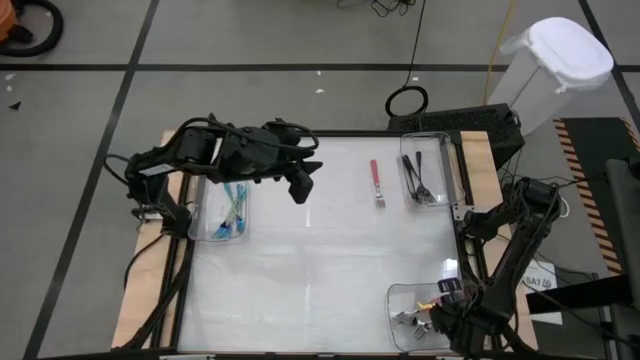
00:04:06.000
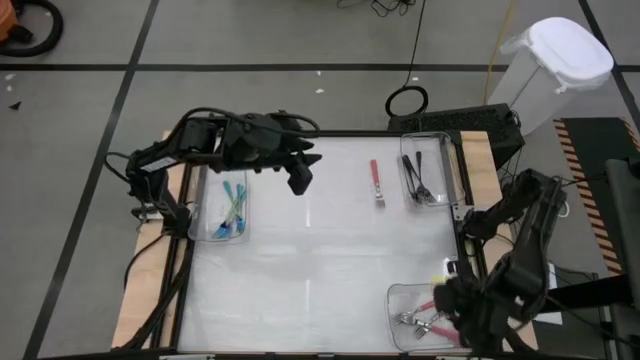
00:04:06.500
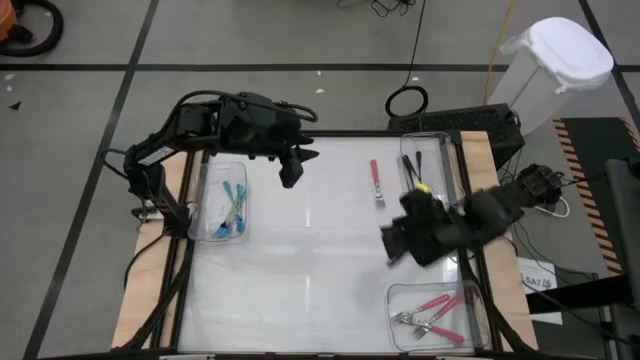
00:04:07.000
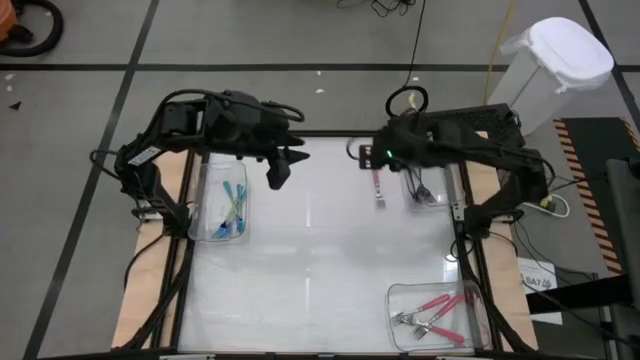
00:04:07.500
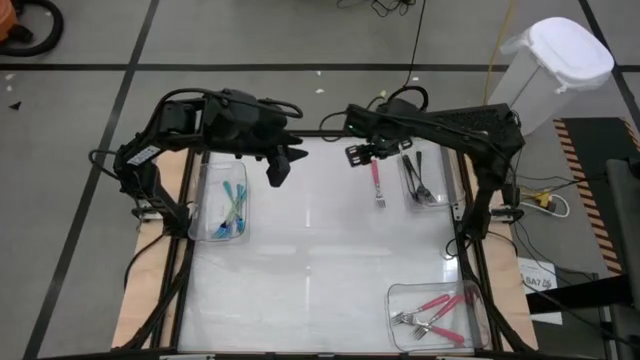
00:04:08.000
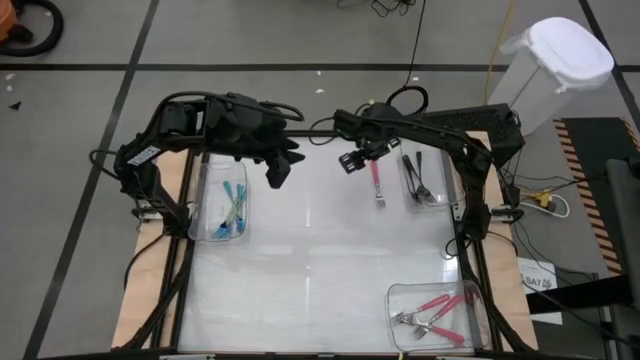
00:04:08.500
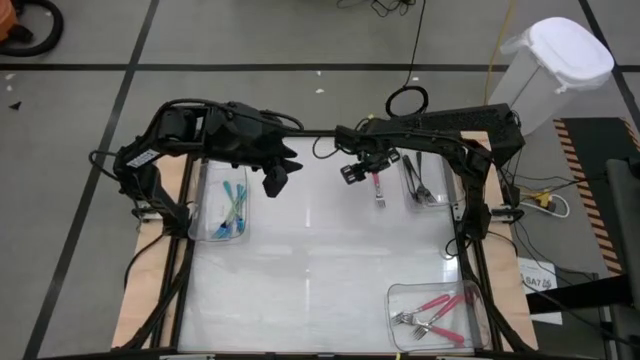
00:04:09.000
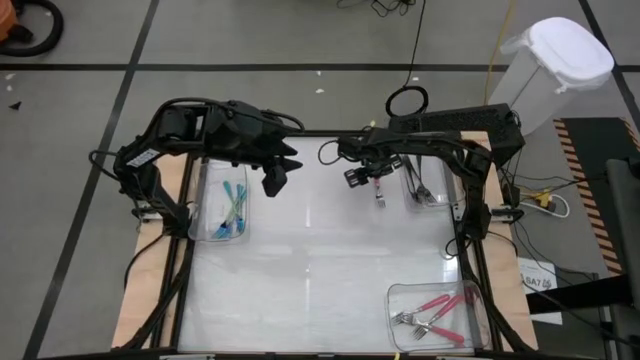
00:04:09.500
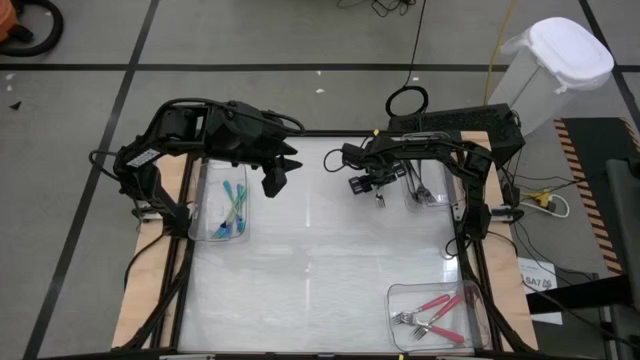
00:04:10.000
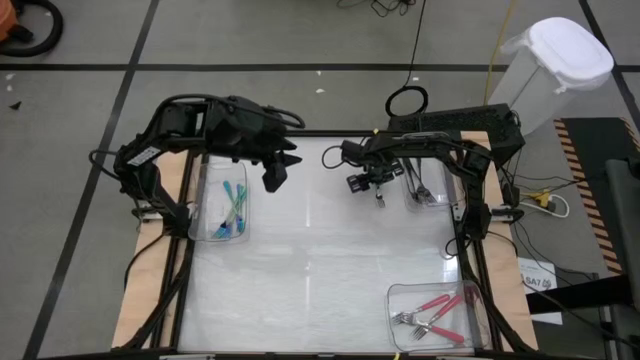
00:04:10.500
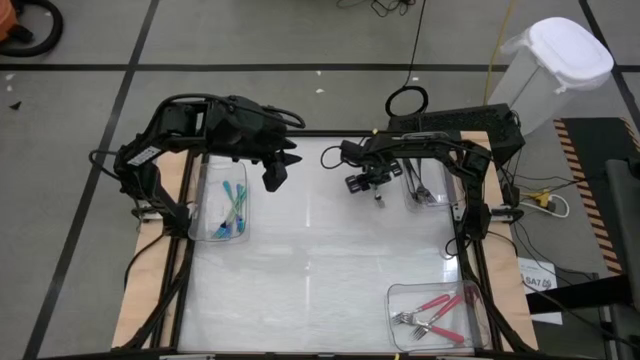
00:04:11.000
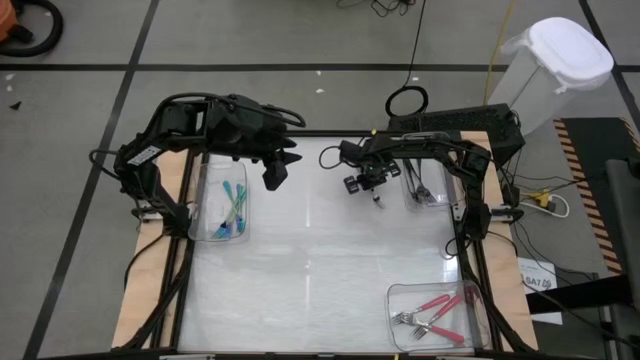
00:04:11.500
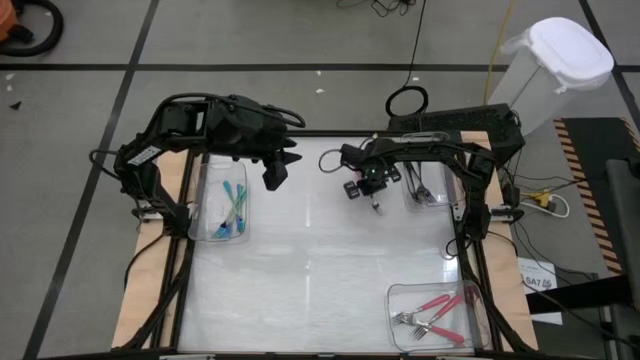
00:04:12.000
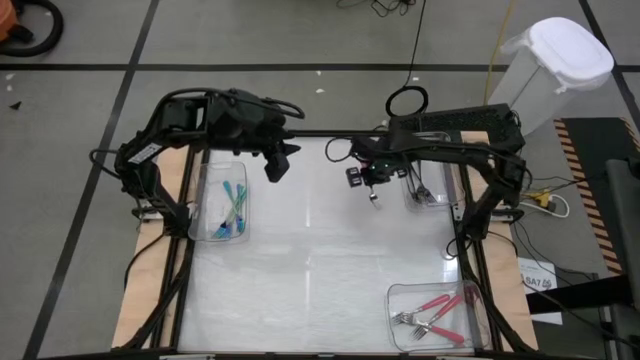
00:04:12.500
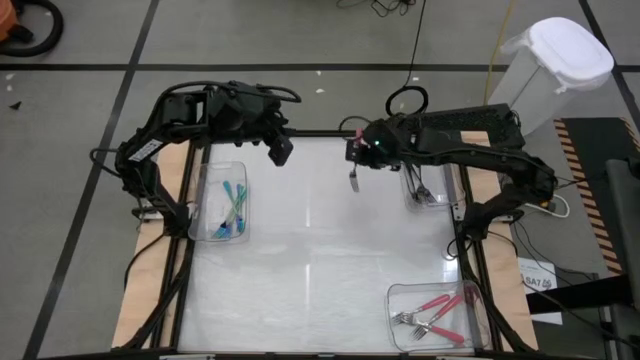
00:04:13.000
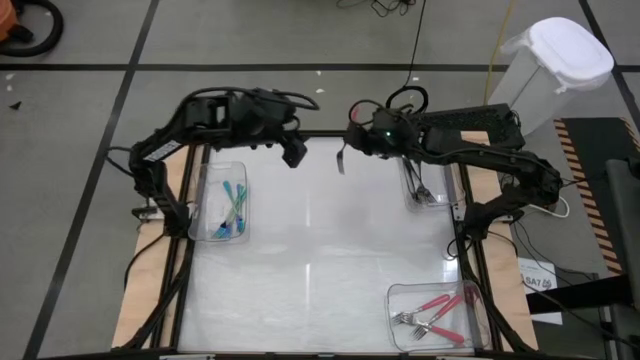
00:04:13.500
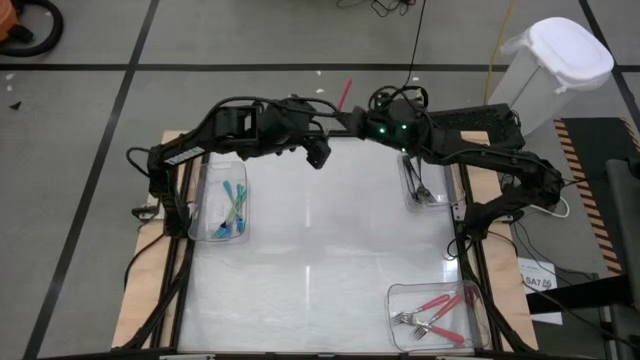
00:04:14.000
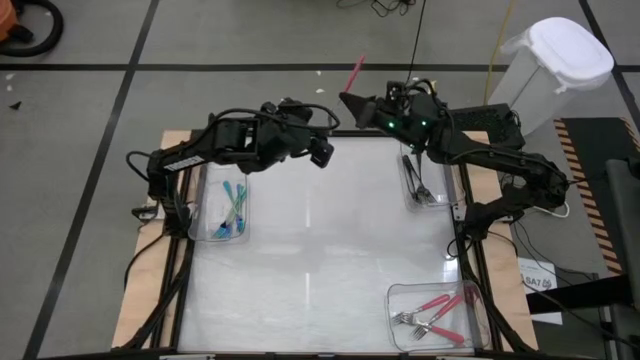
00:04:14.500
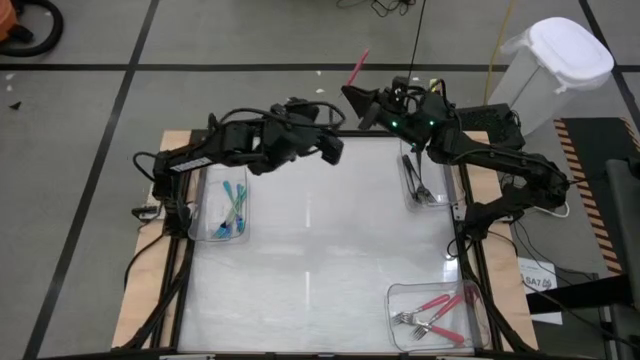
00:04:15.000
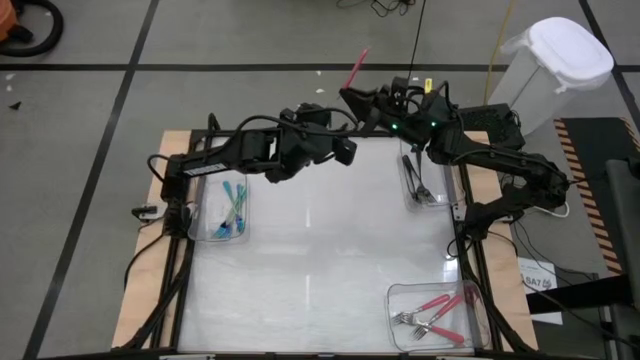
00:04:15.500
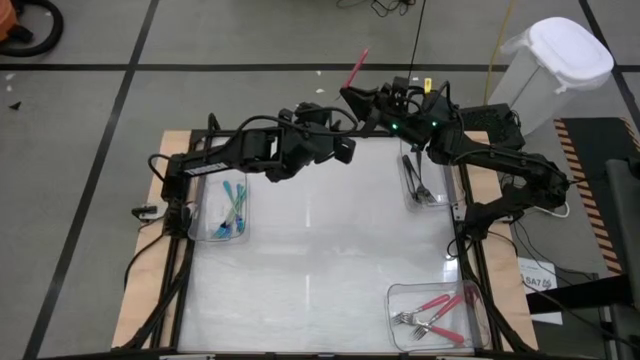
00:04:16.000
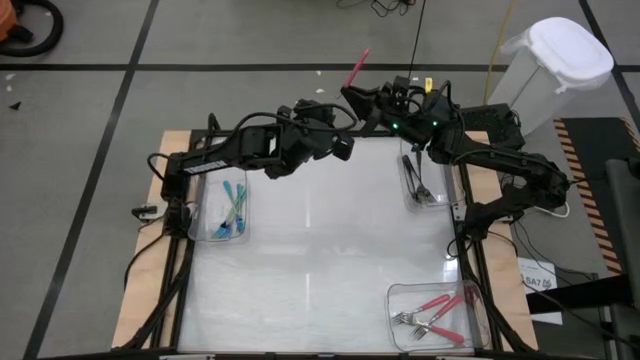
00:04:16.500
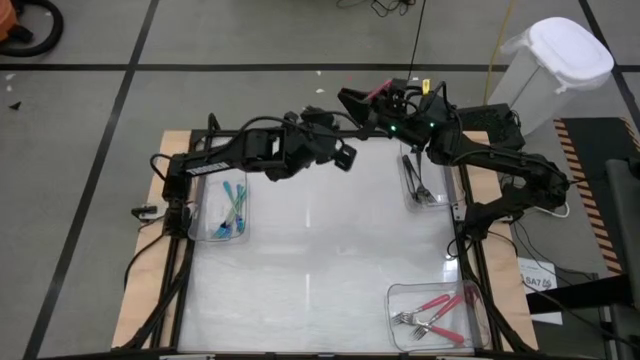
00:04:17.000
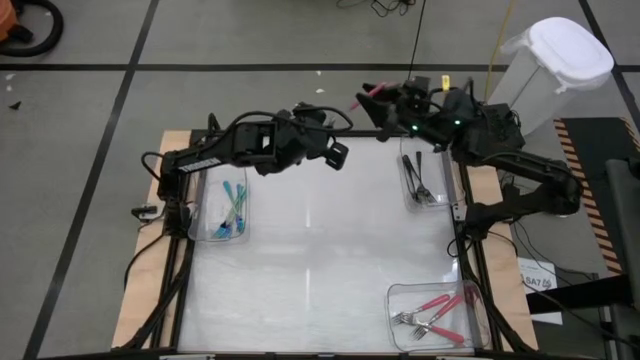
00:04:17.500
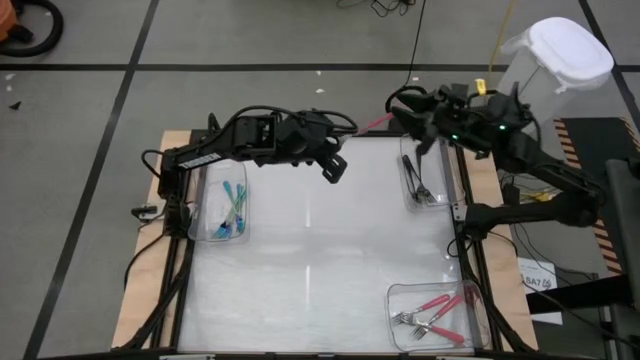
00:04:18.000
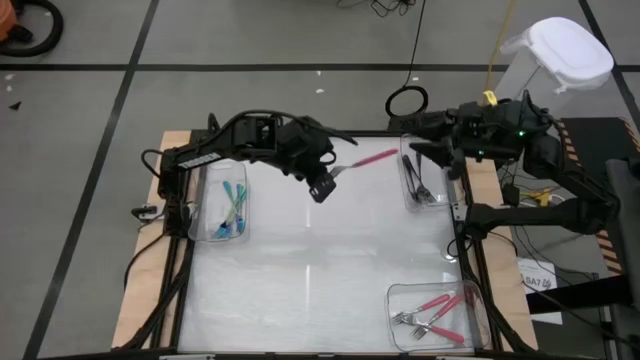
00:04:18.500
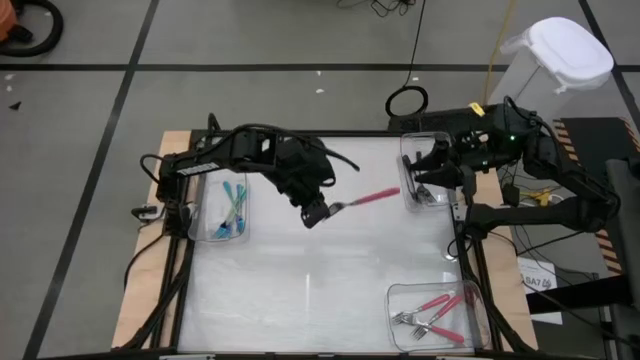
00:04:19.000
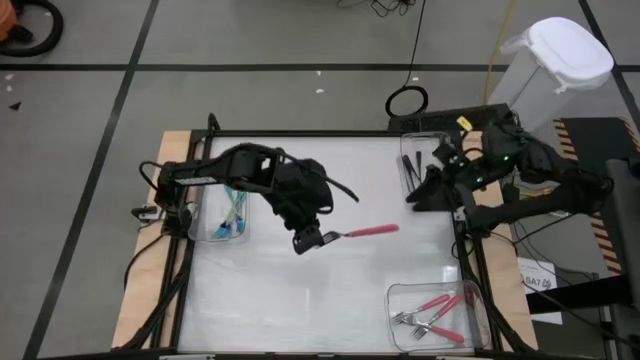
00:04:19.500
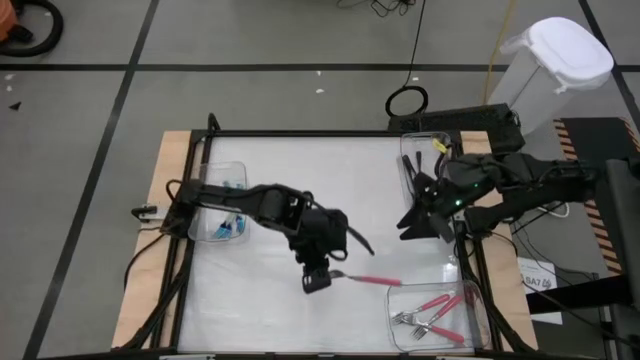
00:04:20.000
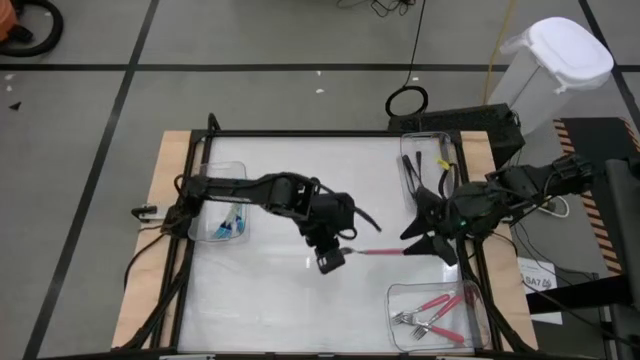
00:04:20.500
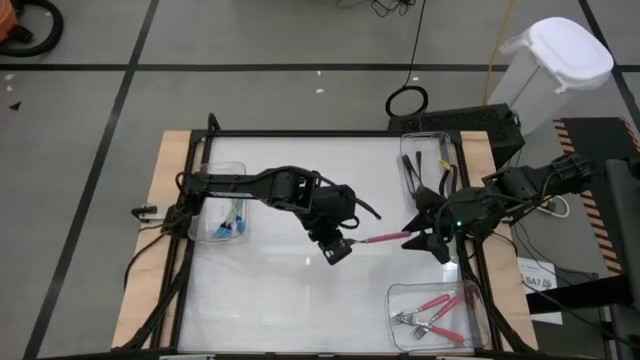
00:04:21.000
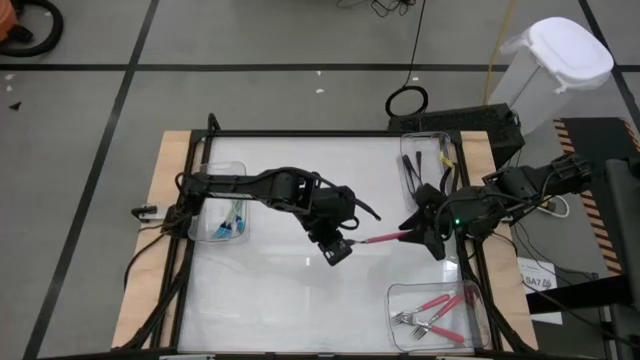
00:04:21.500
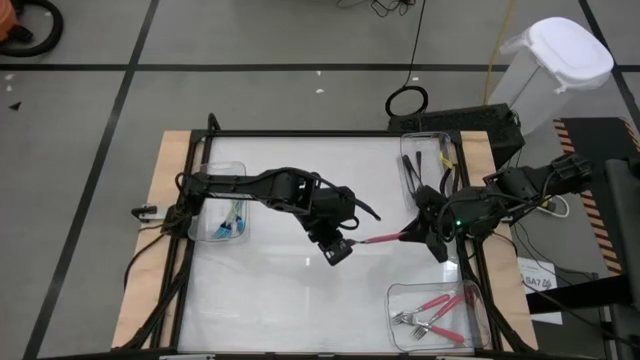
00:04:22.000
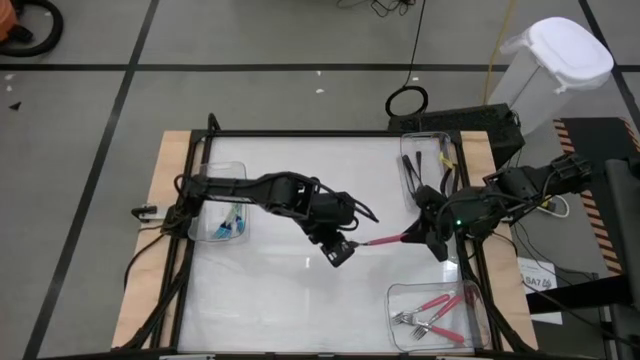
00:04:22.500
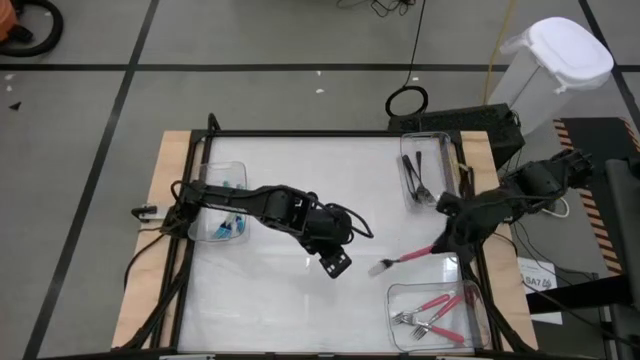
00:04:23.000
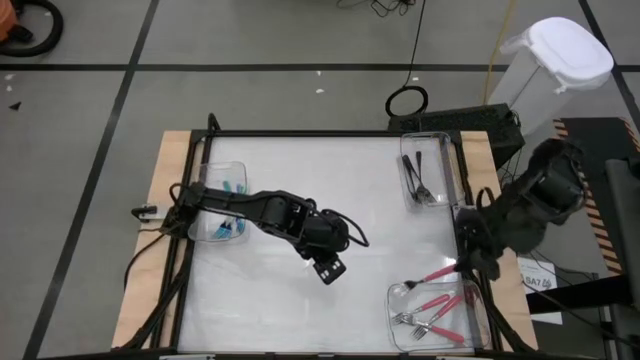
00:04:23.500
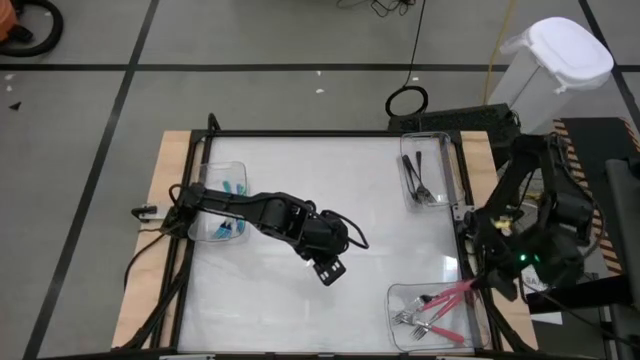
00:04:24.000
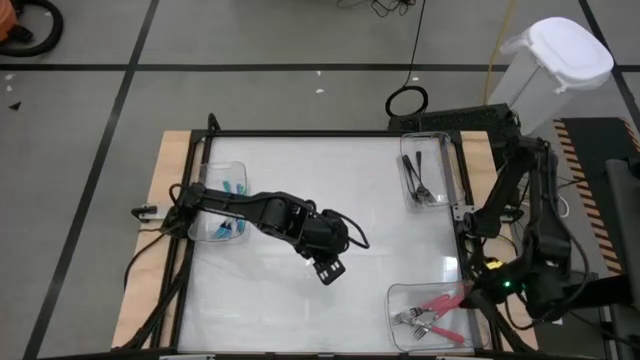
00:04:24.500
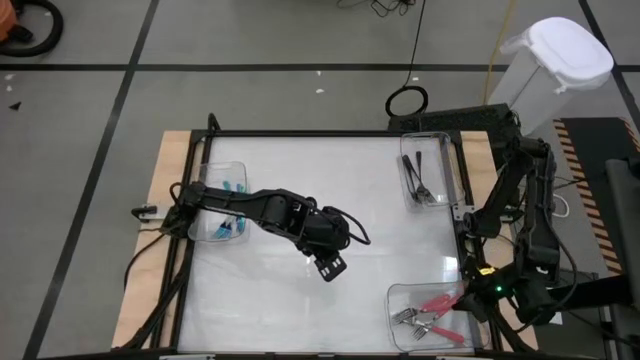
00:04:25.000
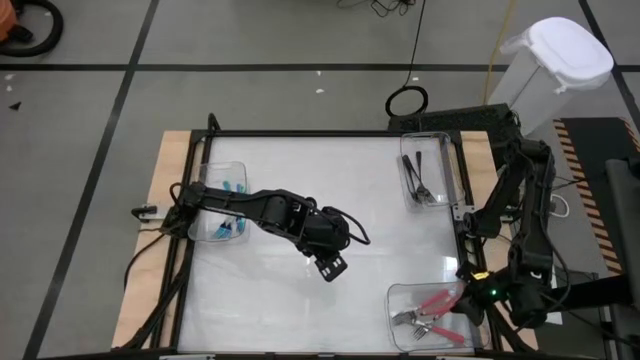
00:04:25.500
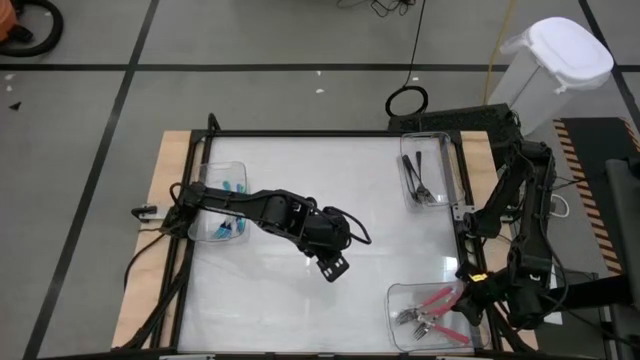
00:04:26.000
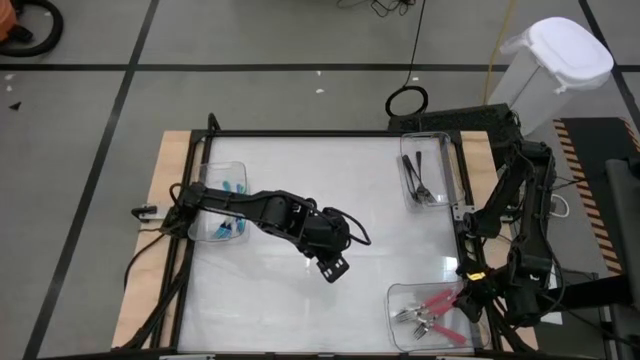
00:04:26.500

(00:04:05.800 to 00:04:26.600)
Task: Sort silverware by color (type)
Put the pink fork into the bottom right transparent bin

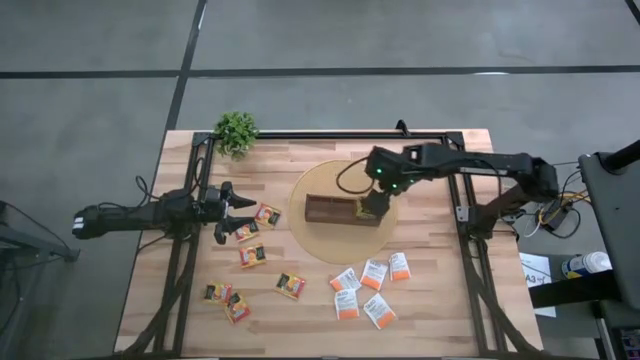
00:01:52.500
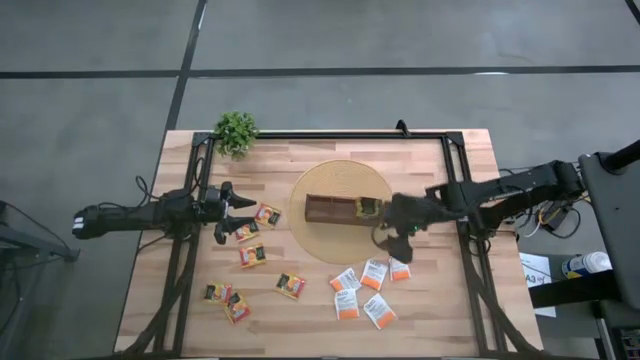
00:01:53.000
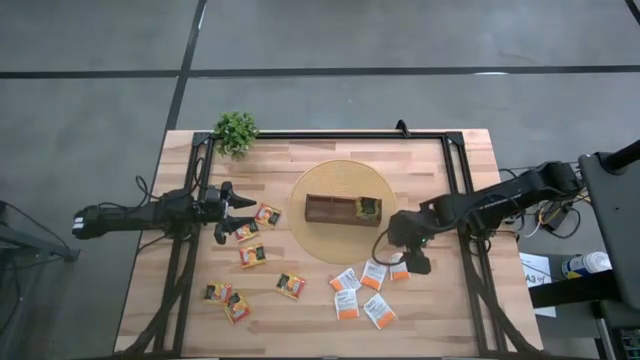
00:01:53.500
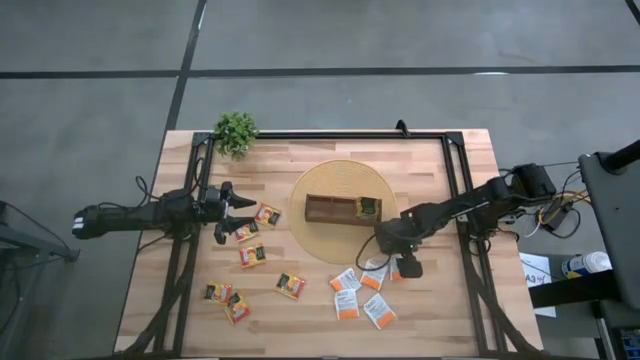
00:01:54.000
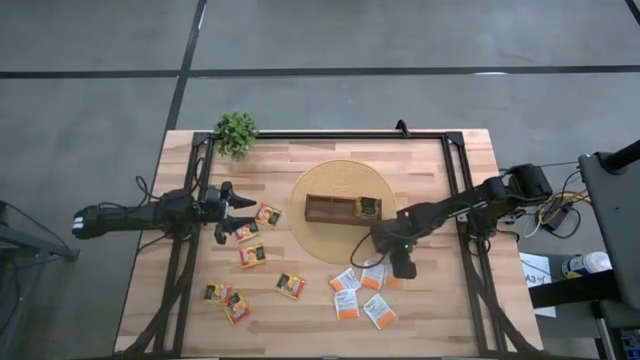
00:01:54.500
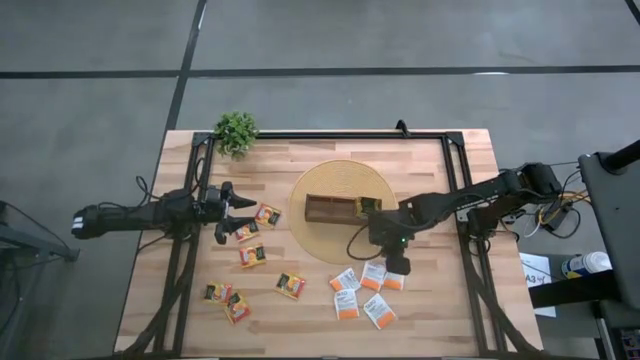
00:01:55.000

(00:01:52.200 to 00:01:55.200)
Task: Pick & Place Tea
Put the white tea bag into the middle section of the wooden organizer
